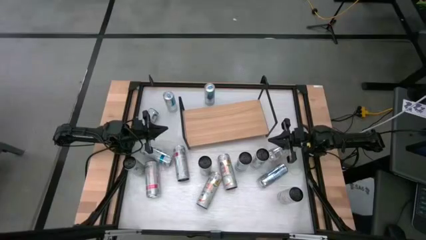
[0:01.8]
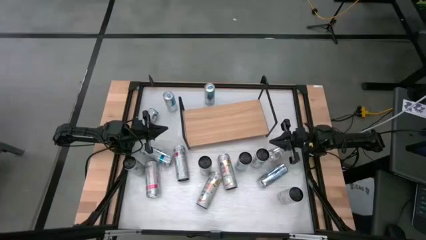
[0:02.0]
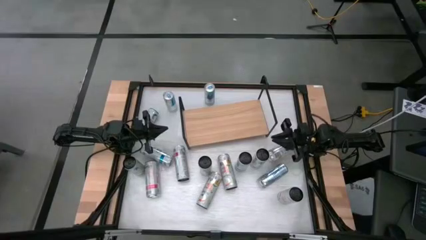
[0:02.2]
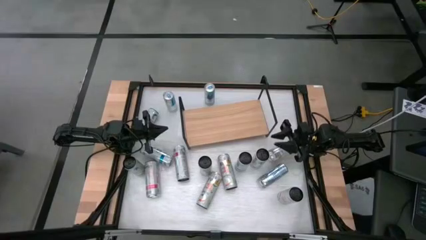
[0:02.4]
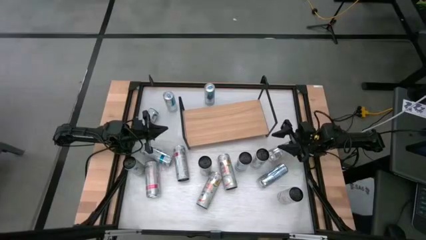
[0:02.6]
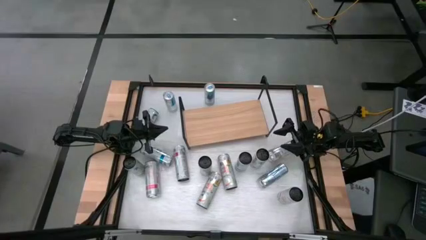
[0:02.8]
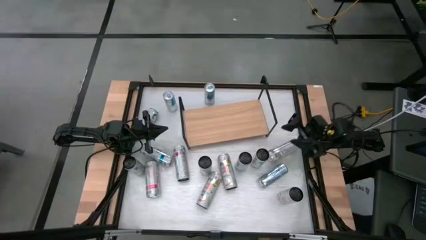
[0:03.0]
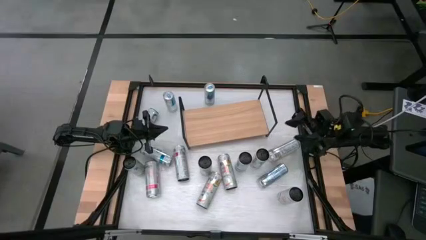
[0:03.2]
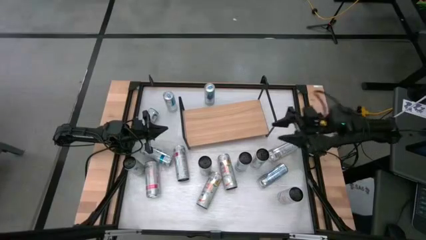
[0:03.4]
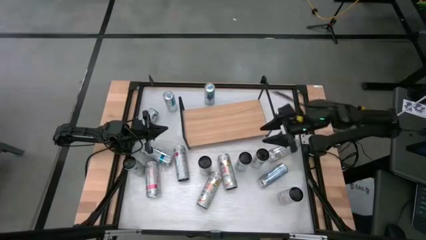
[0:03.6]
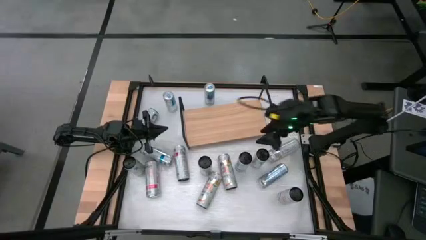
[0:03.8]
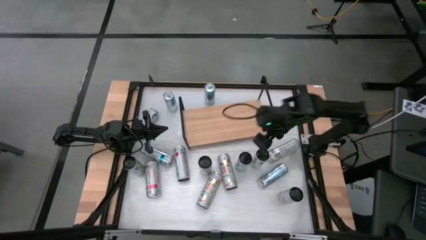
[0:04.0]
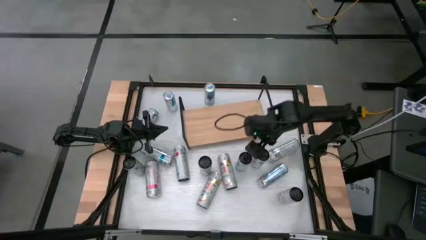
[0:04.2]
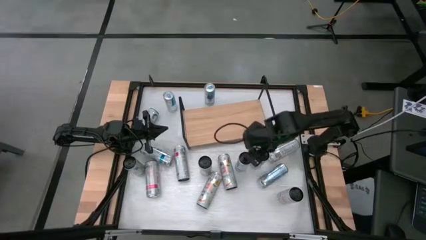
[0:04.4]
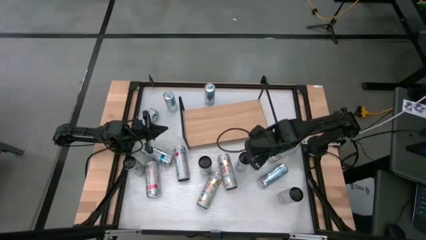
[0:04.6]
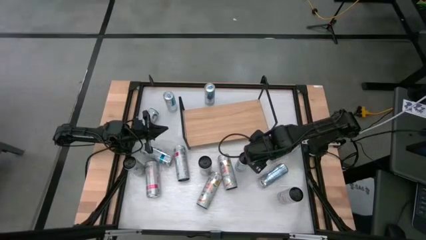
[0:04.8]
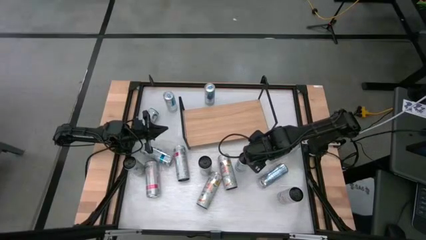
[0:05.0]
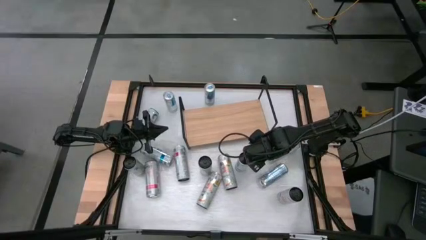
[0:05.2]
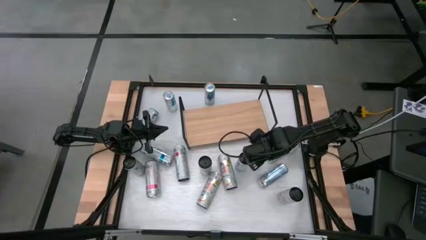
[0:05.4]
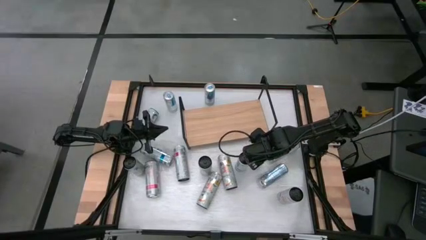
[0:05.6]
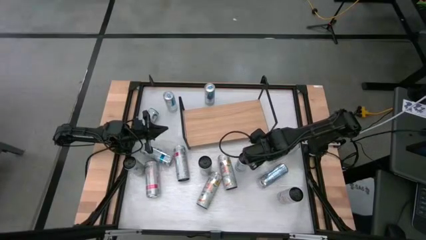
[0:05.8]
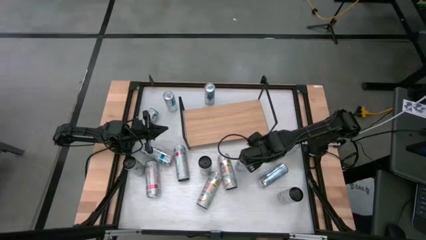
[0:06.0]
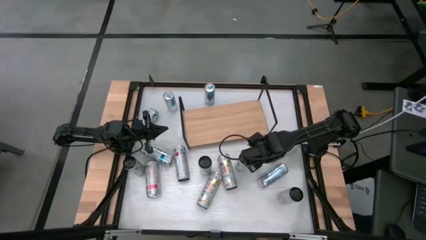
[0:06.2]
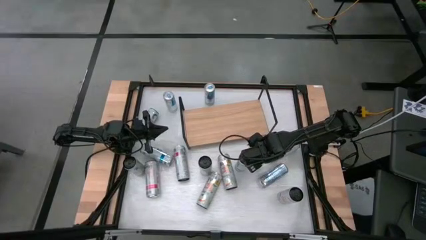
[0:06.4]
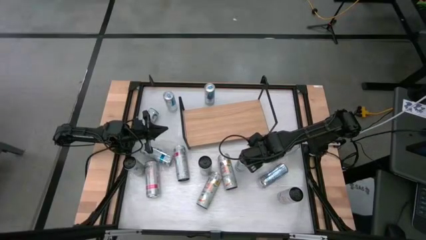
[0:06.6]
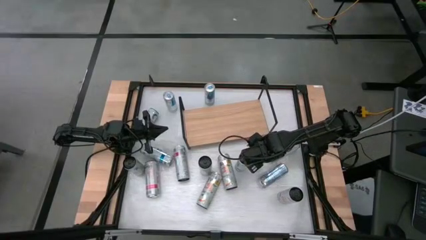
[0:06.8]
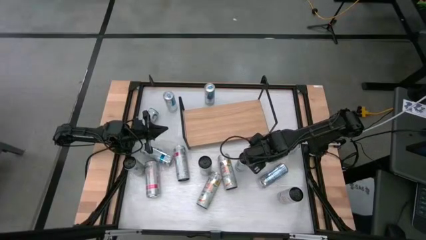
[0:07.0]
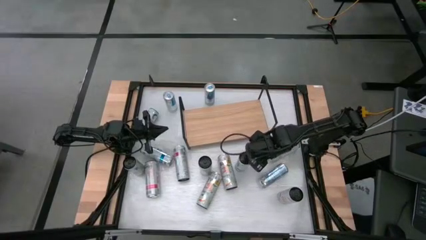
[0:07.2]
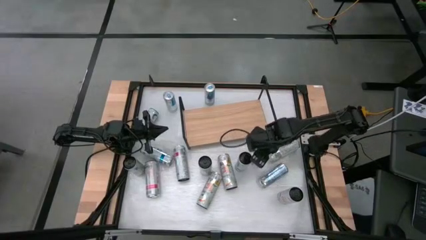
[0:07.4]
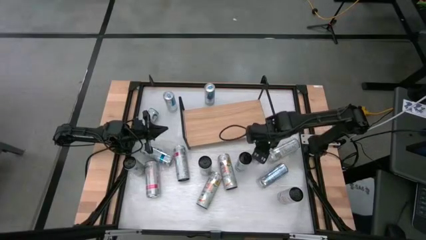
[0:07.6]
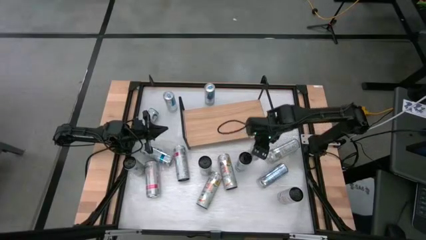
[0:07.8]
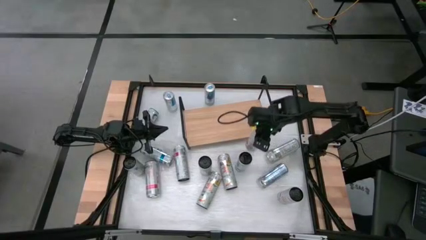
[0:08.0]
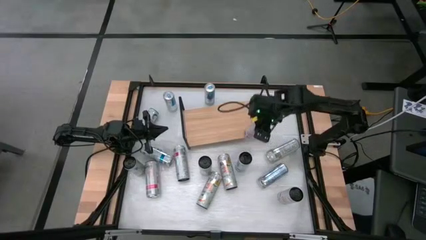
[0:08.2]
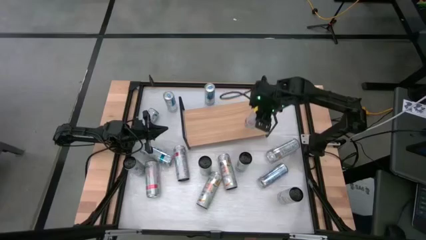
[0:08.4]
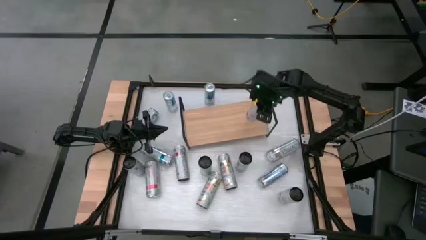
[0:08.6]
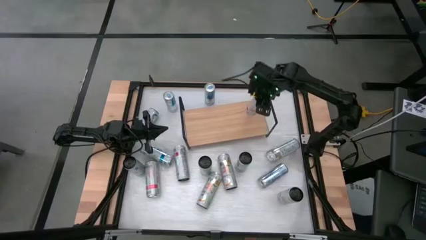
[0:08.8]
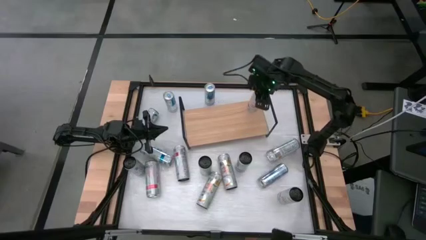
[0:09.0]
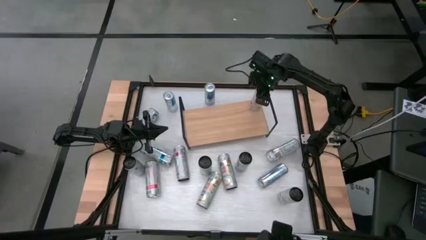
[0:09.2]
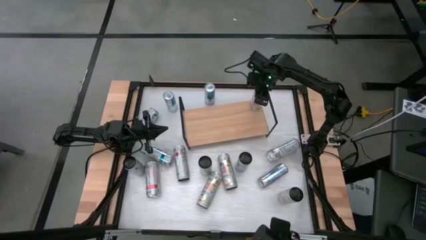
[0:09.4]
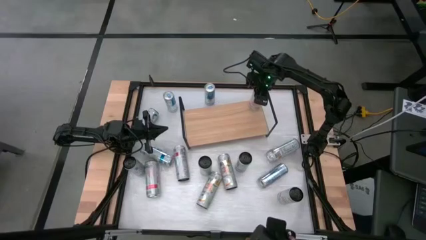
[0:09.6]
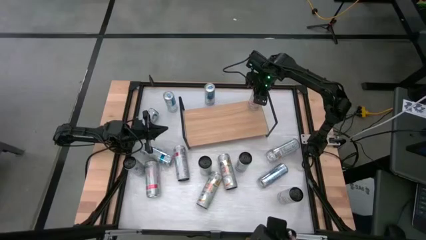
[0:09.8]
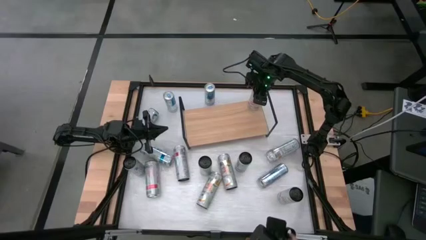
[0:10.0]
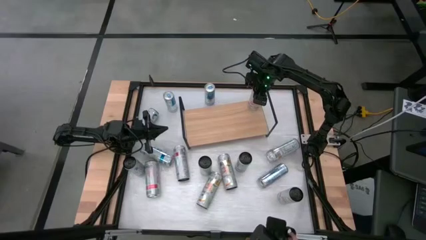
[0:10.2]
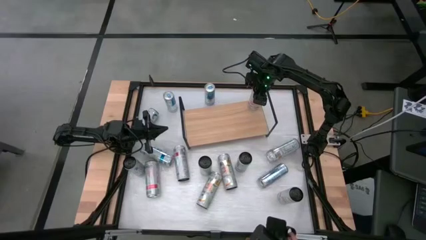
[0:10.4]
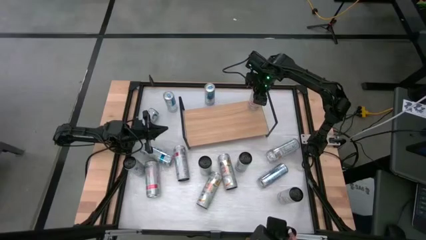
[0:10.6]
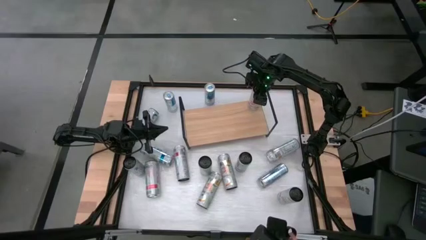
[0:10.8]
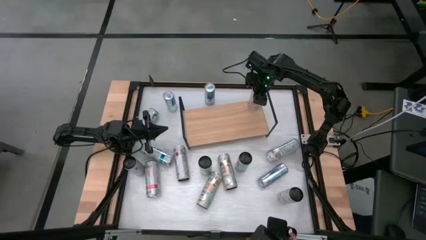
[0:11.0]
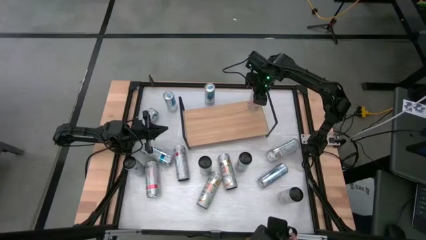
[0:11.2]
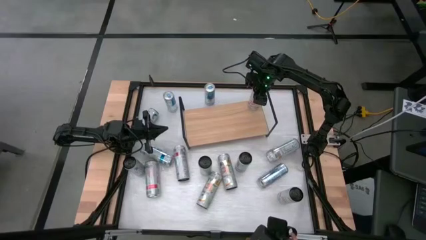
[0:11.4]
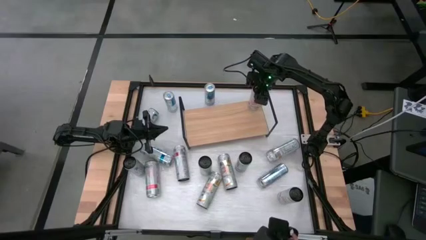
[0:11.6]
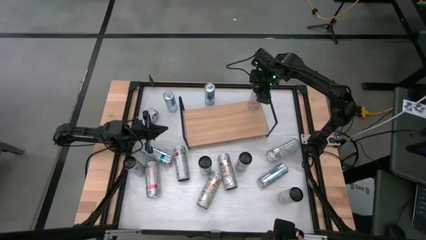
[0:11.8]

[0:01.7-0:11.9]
Task: Place canned beverage on shelf
Put the white-pink soda can on the shelf

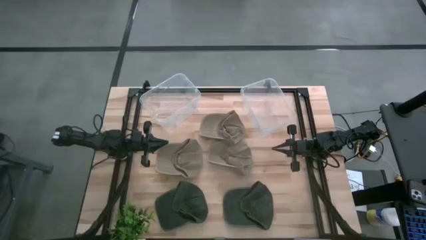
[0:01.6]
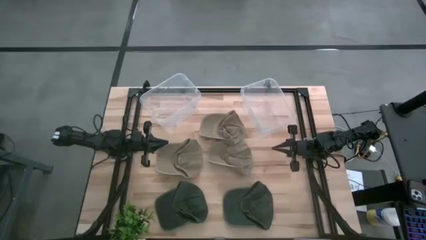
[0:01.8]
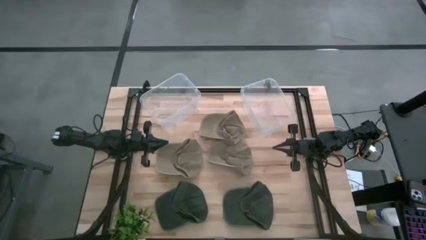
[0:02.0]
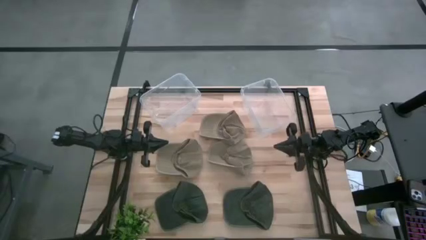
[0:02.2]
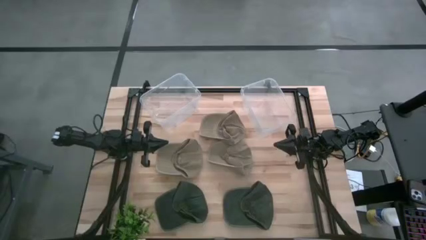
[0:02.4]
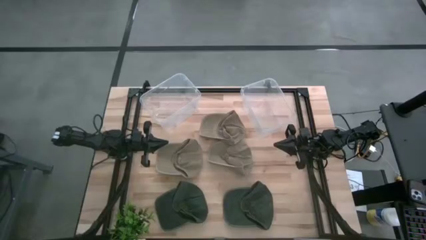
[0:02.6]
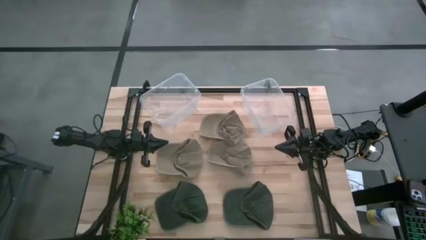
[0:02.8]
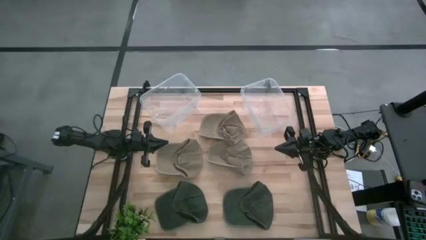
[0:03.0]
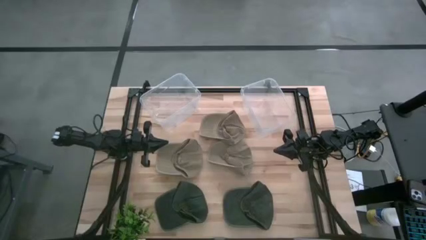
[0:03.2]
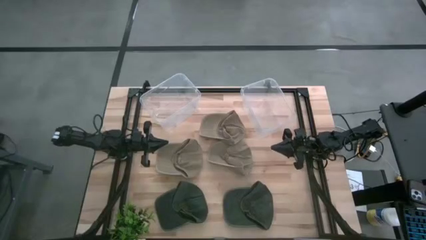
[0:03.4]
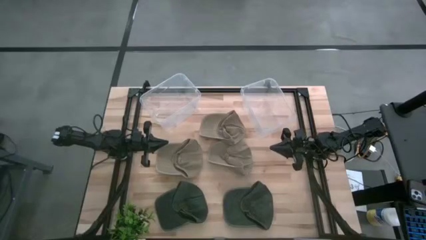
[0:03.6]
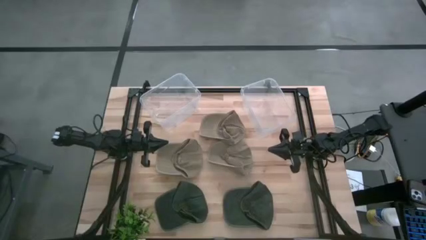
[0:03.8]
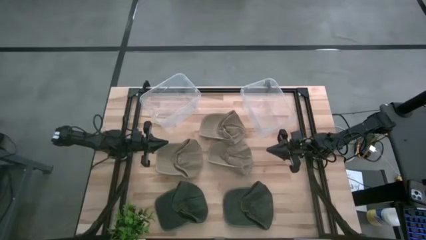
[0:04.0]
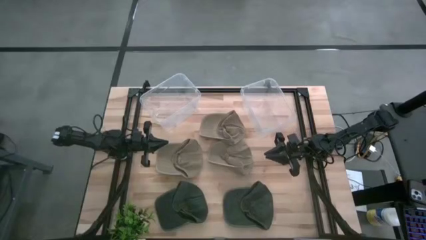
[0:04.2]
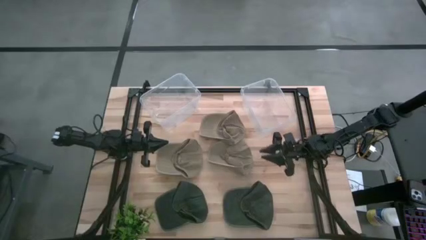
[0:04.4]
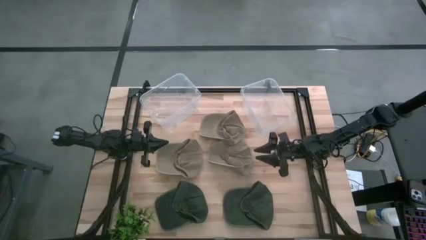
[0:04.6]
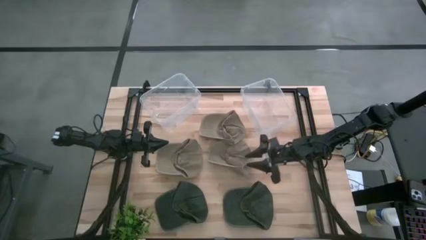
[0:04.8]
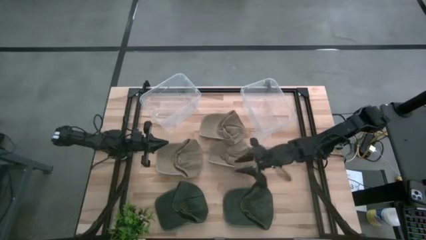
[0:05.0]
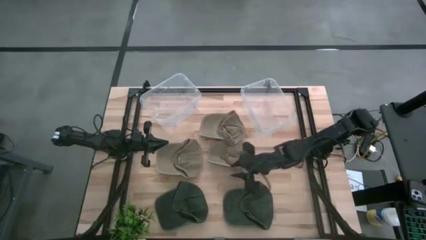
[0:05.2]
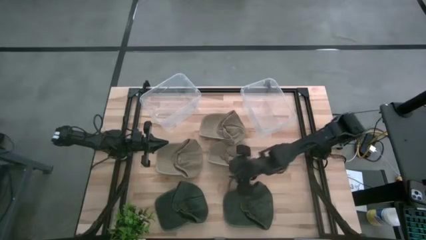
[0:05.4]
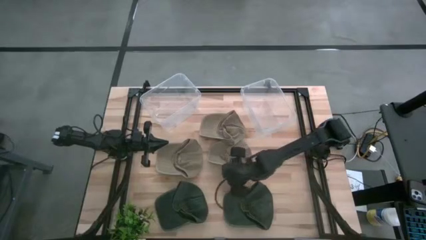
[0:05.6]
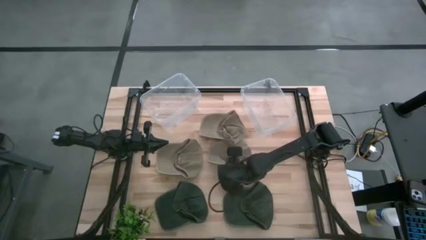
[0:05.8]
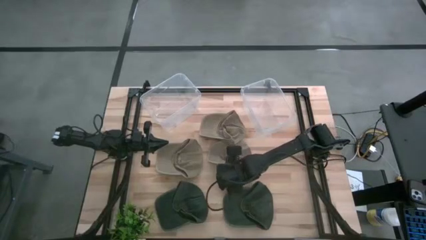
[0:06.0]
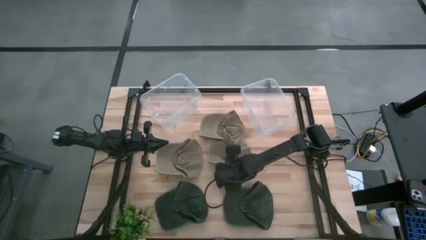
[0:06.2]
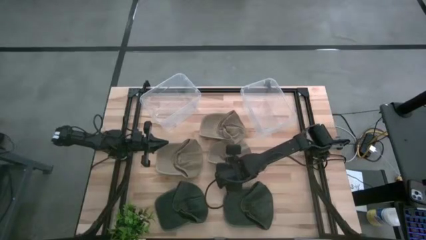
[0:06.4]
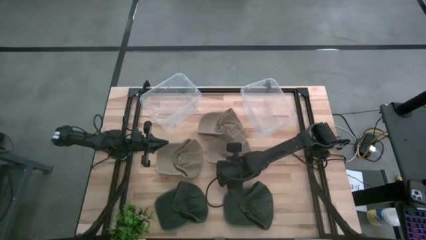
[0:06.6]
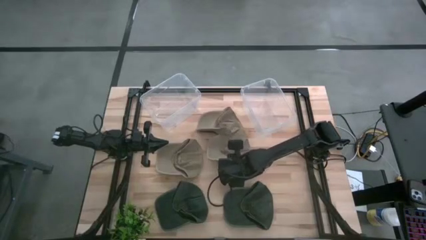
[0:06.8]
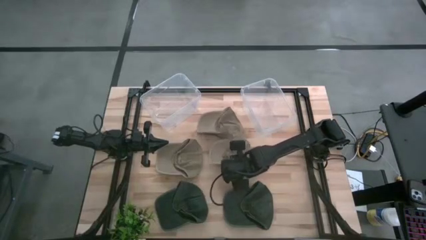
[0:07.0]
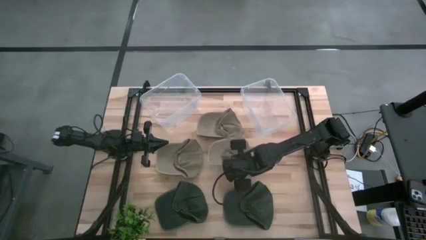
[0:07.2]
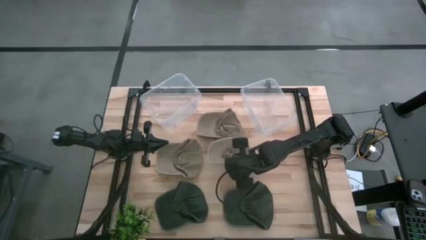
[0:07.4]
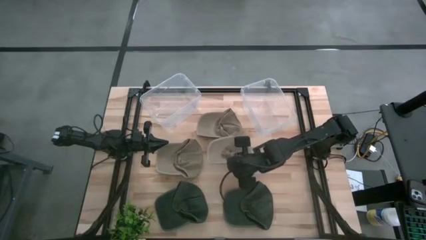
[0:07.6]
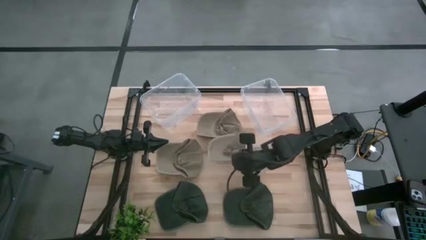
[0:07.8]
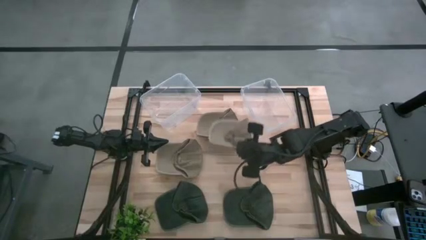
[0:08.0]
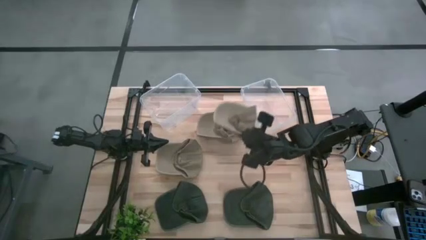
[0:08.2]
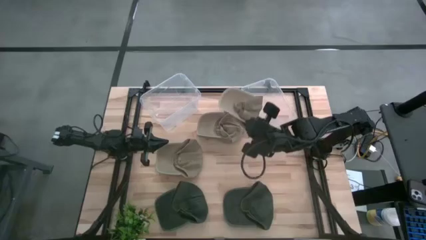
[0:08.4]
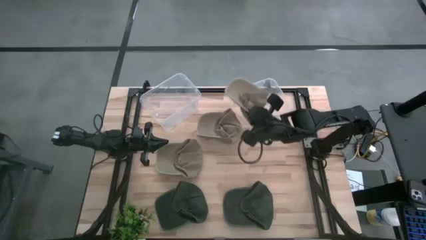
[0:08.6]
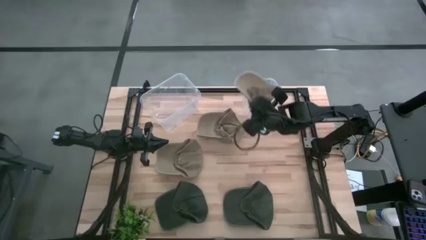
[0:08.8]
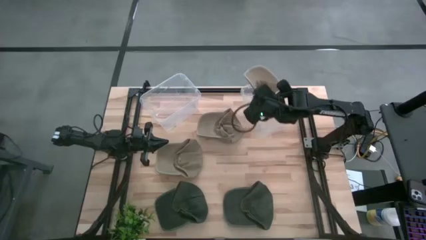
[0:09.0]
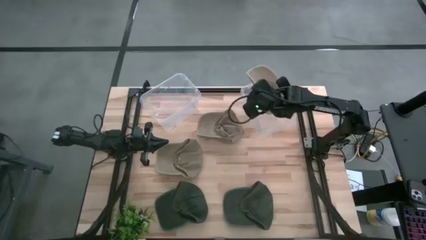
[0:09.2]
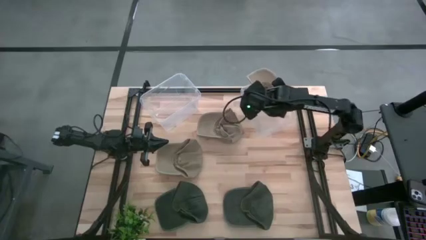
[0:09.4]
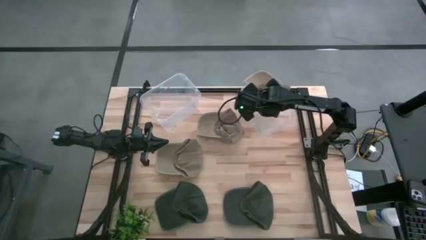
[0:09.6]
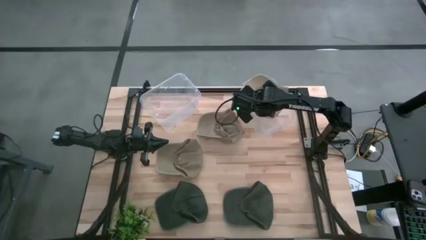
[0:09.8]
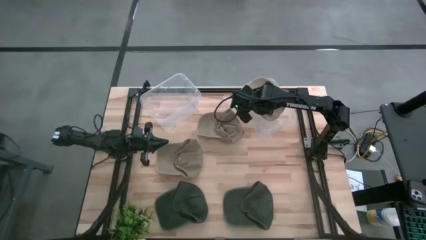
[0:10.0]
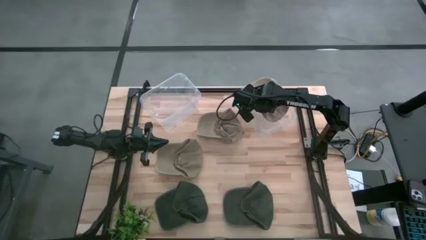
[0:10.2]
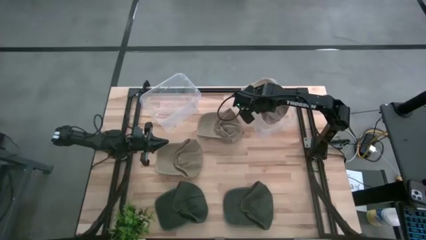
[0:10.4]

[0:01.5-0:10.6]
Task: Pick & Place hat
Put the bottom right brown cap into the right transparent bin
